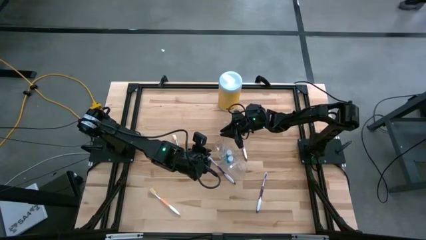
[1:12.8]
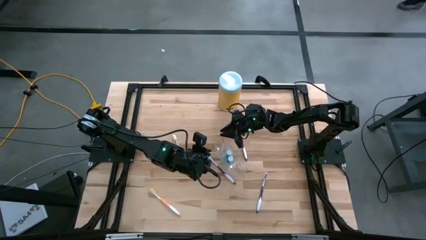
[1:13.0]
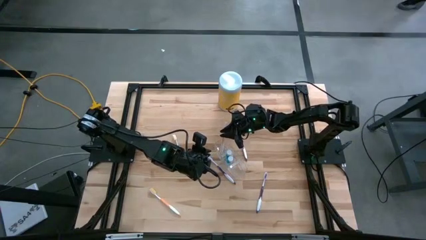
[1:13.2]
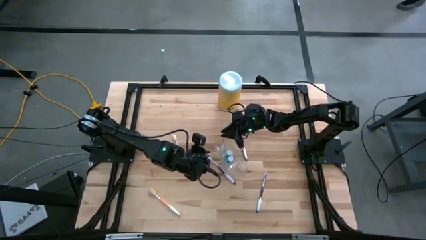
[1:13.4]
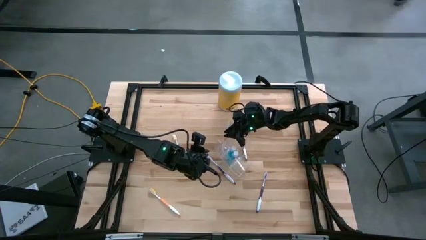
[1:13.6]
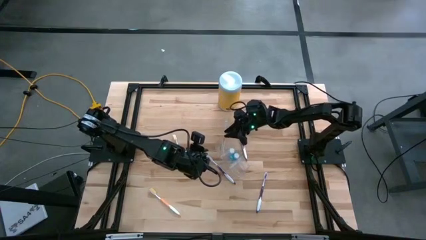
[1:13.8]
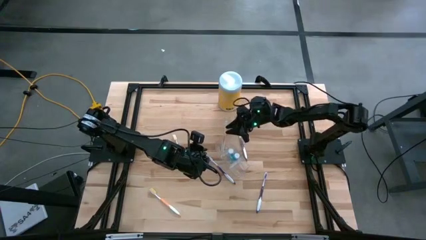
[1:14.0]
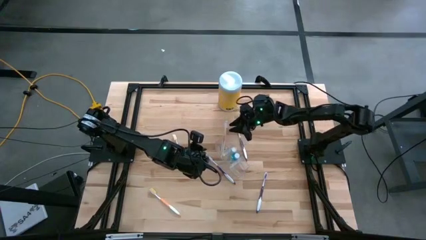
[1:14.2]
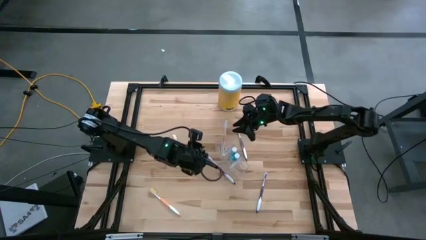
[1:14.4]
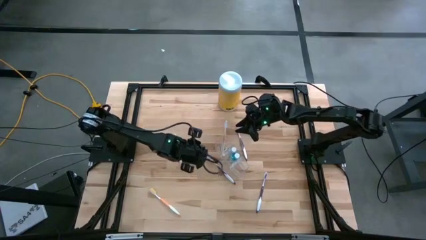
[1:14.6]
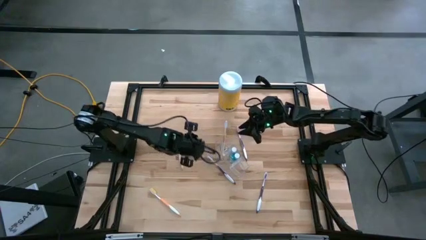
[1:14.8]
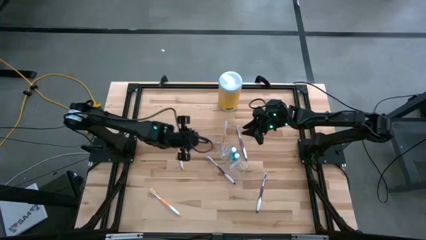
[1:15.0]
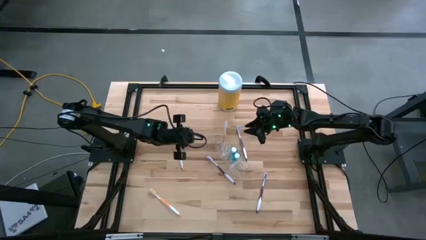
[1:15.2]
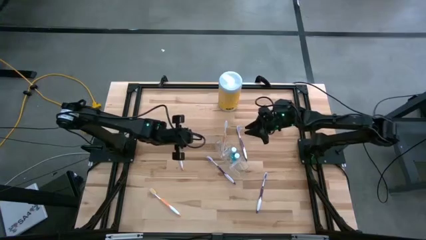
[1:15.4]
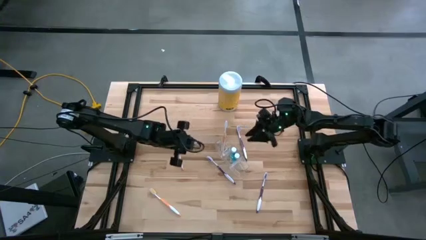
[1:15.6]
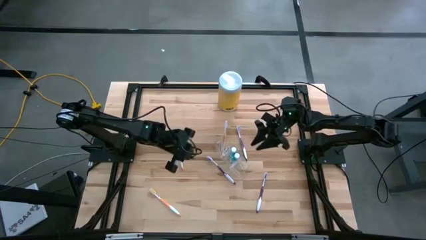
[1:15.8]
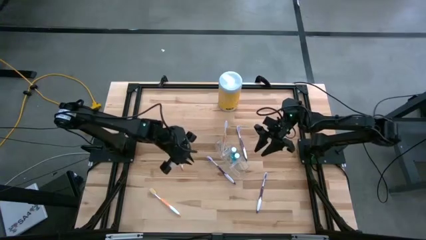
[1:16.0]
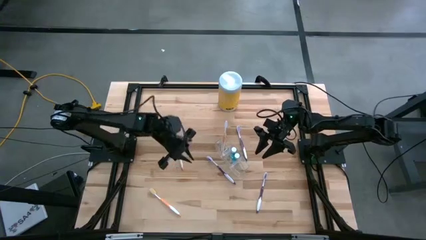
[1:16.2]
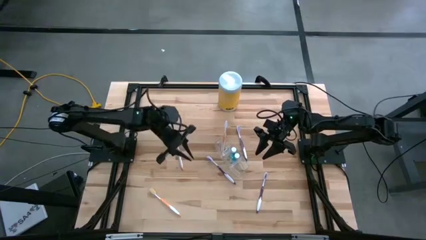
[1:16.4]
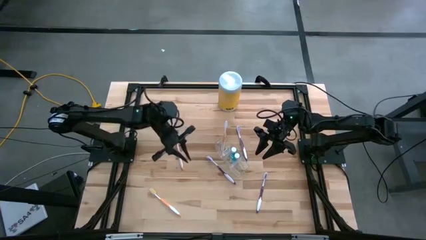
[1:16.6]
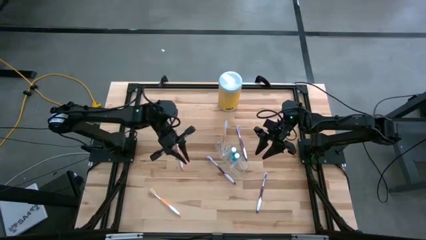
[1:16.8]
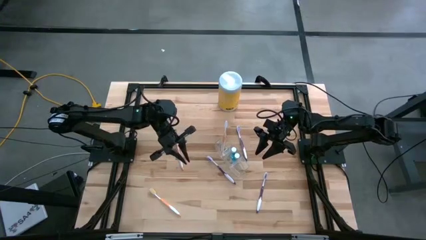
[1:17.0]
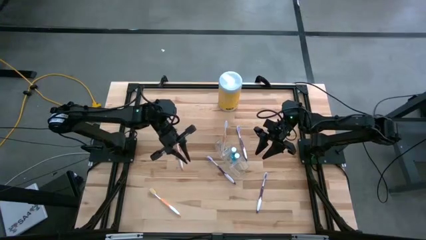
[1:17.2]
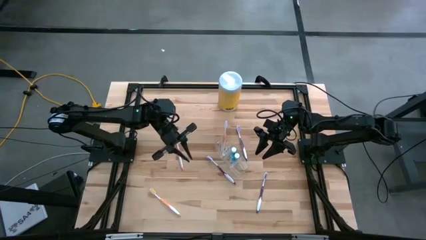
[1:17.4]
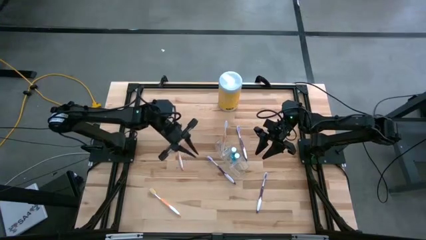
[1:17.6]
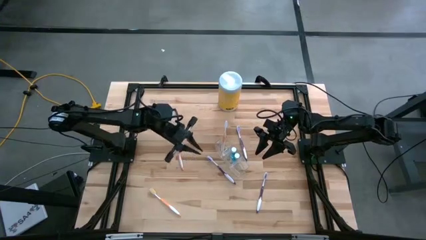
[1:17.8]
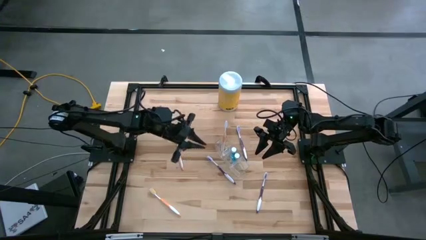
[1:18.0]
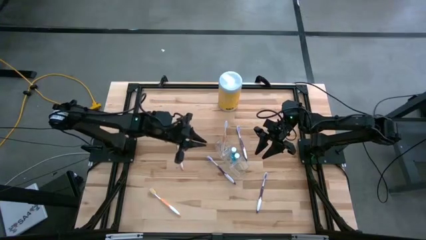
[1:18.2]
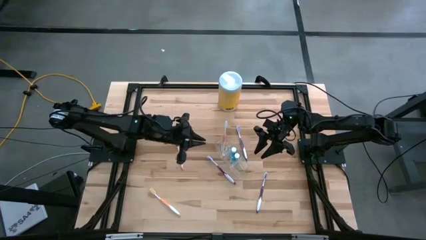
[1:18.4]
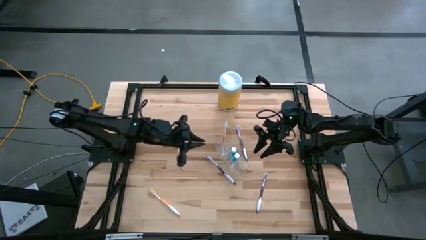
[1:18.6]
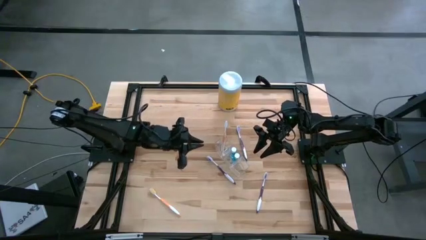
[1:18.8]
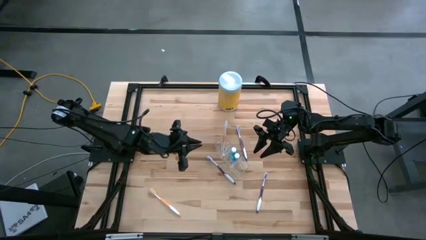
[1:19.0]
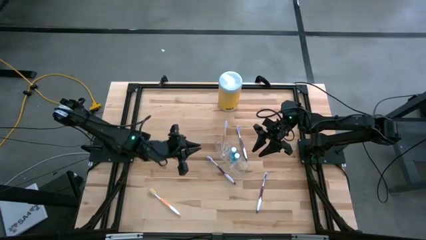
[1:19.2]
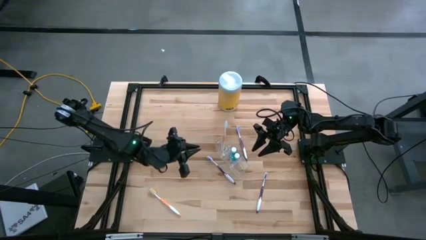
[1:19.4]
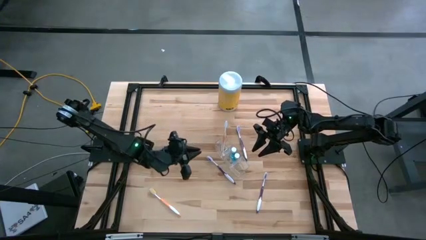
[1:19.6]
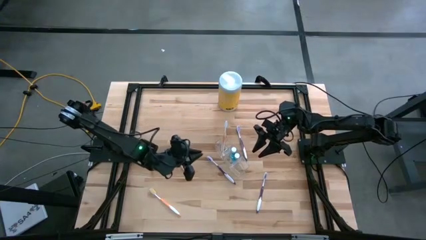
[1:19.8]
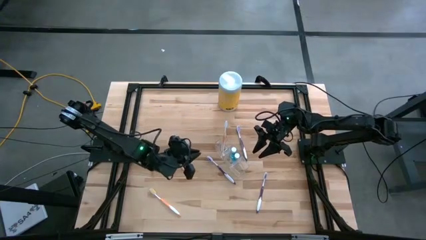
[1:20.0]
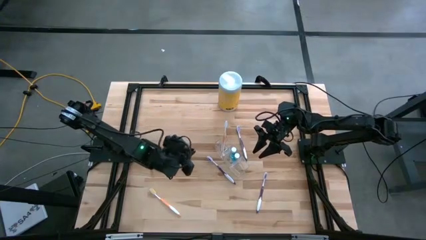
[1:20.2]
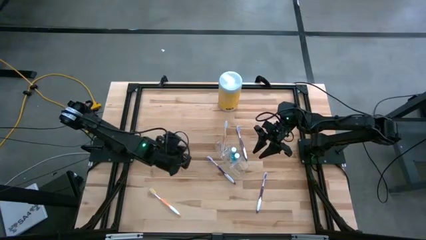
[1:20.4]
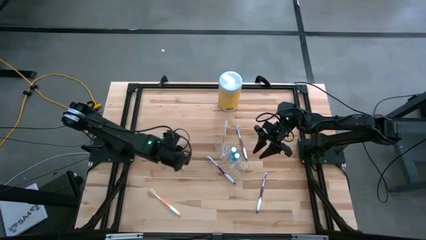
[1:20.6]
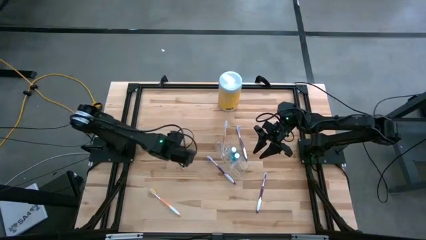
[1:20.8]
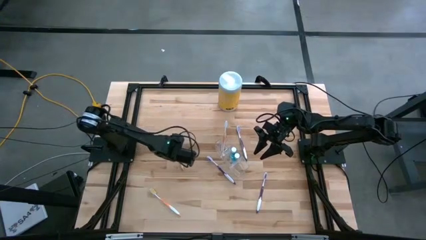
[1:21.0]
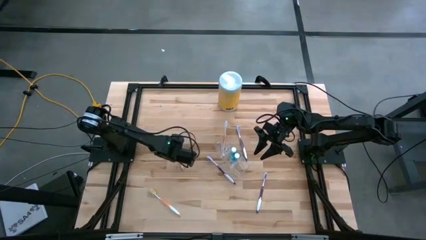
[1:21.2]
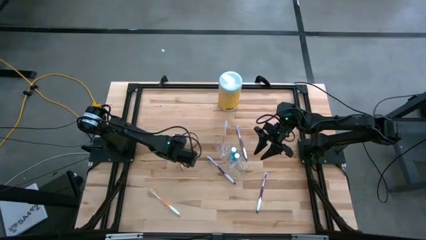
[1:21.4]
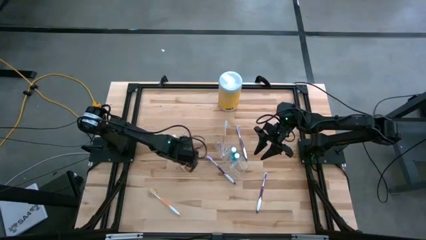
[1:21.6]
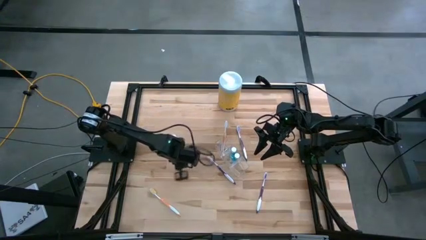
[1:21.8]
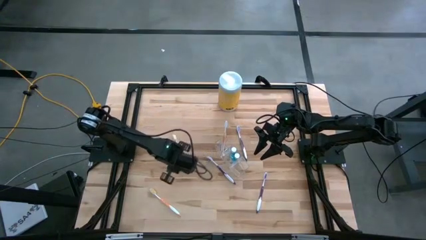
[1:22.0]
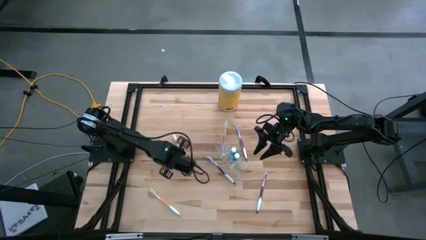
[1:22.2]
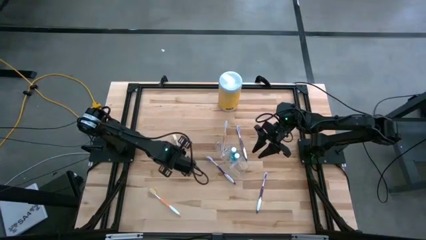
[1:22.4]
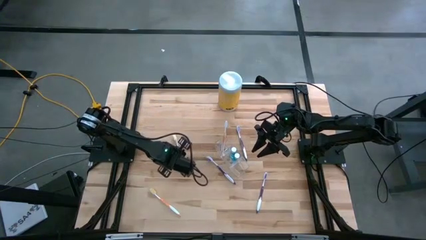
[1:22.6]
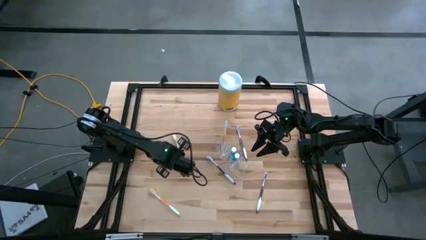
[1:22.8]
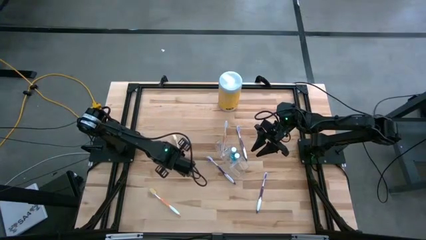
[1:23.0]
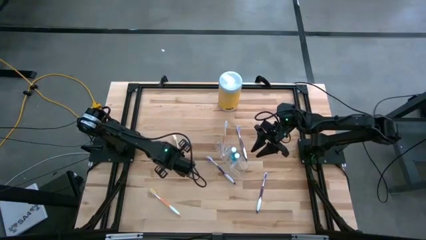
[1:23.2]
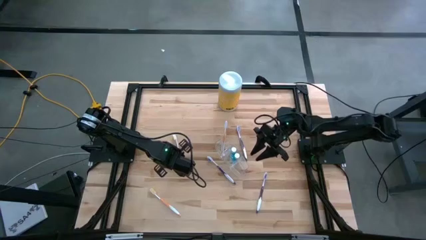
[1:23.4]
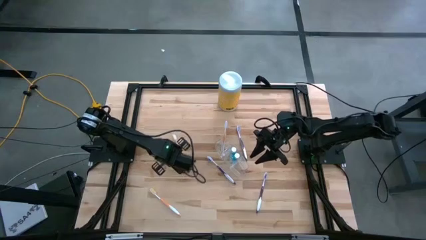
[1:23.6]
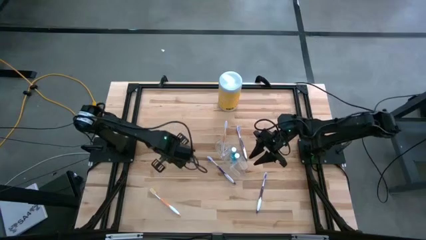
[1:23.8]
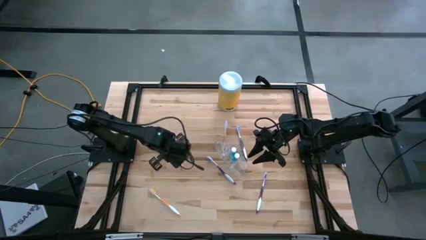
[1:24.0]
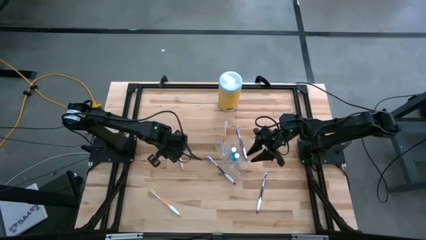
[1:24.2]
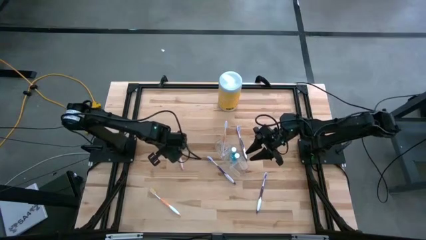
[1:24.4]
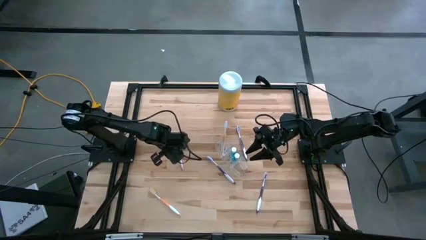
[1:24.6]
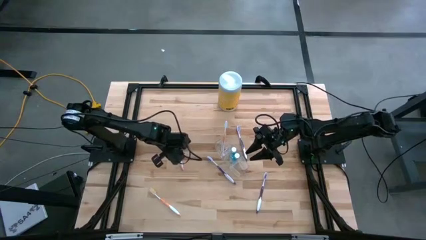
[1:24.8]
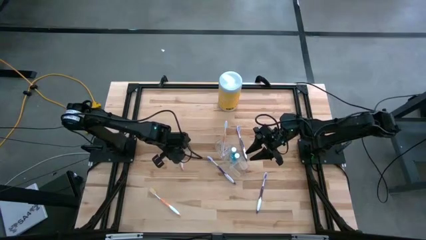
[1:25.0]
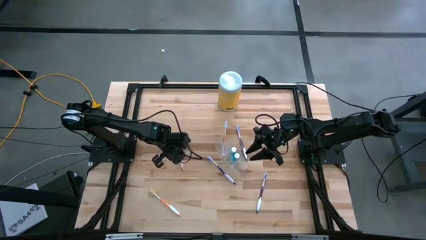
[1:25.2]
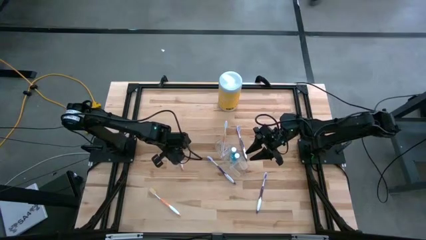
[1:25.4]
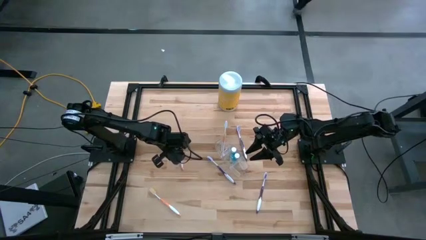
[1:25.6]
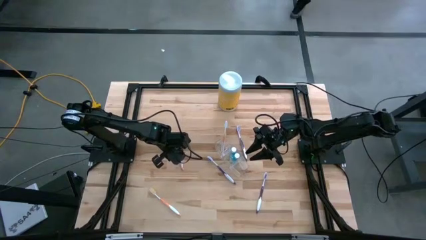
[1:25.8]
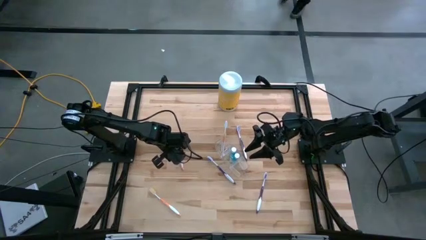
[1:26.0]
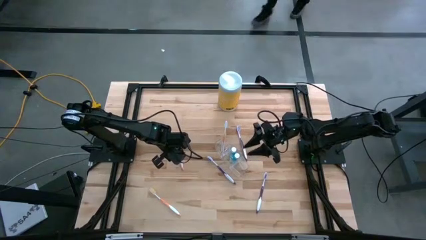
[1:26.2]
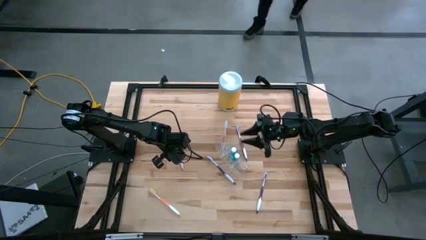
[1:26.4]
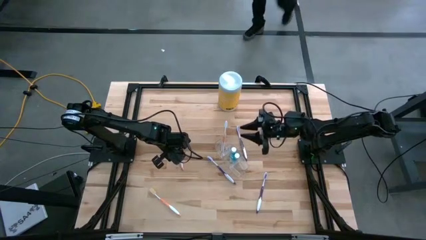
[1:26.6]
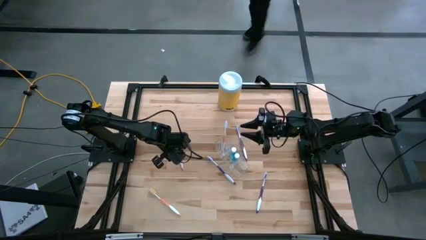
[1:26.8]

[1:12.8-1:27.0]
Task: Pick & Place toothbrushing station
Put the top orange toothbrush into the top compartment of the transparent organizer
